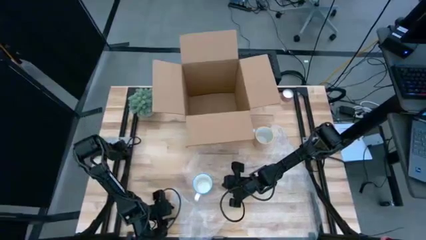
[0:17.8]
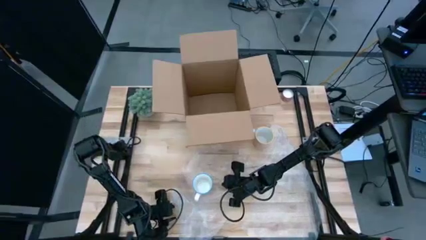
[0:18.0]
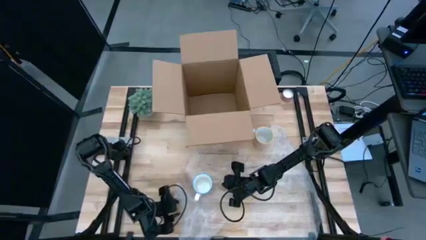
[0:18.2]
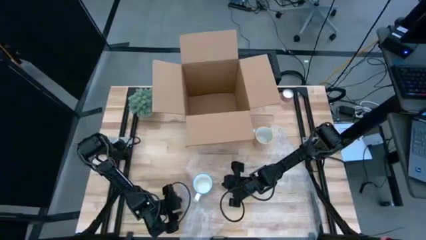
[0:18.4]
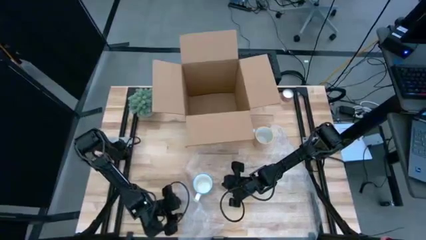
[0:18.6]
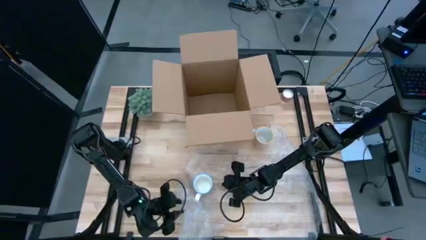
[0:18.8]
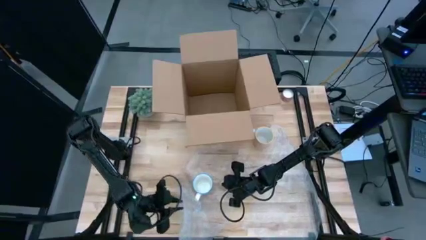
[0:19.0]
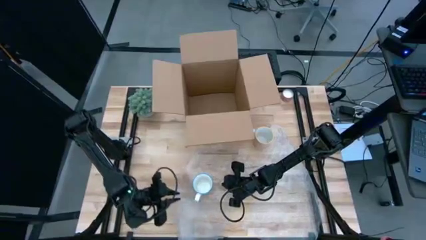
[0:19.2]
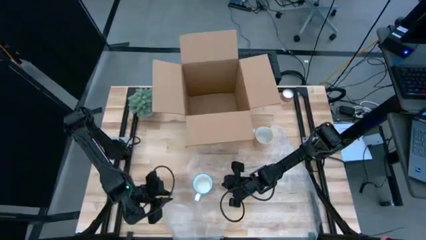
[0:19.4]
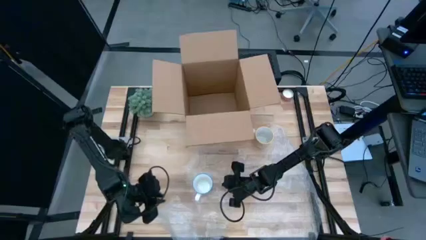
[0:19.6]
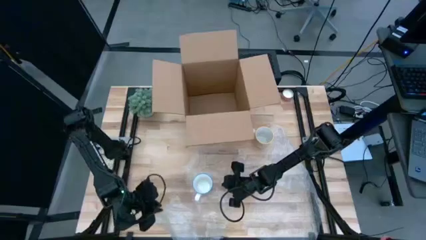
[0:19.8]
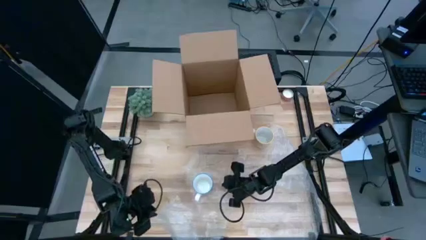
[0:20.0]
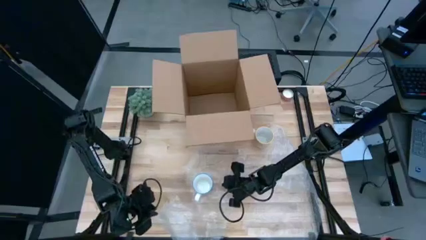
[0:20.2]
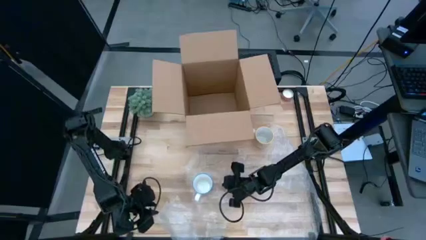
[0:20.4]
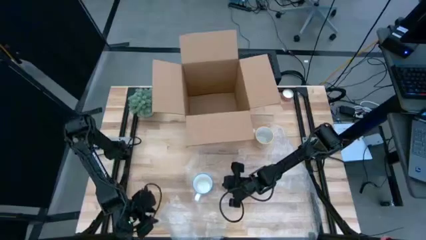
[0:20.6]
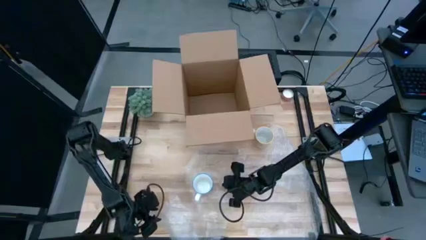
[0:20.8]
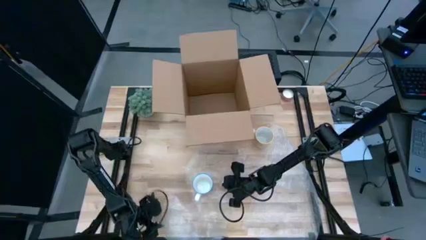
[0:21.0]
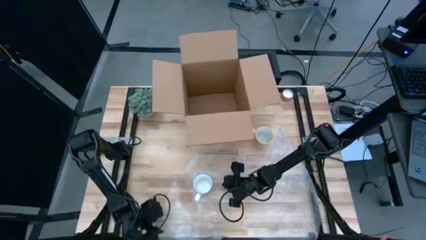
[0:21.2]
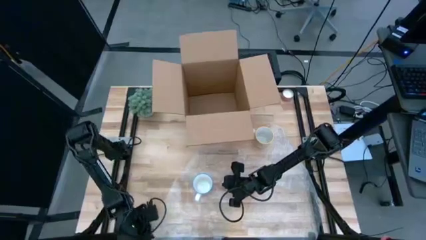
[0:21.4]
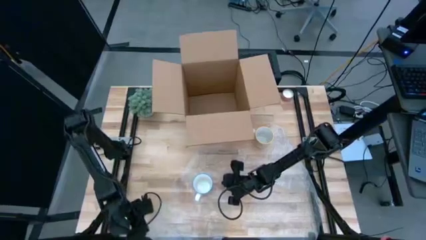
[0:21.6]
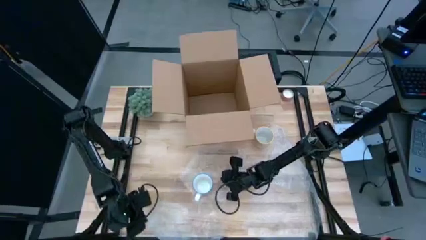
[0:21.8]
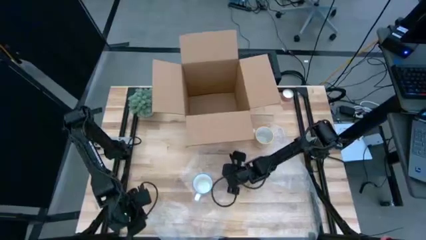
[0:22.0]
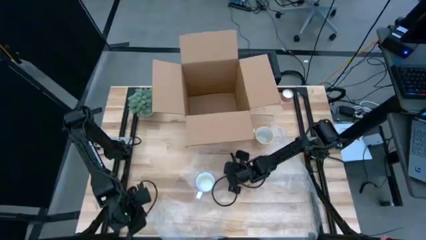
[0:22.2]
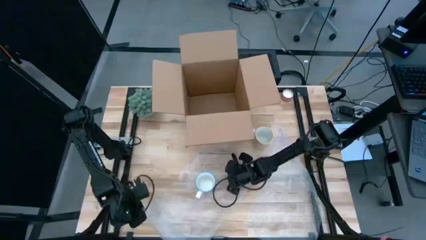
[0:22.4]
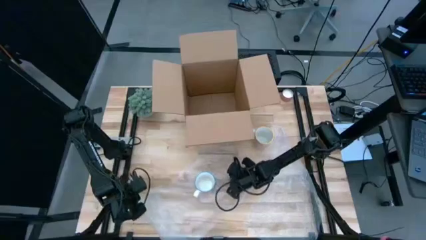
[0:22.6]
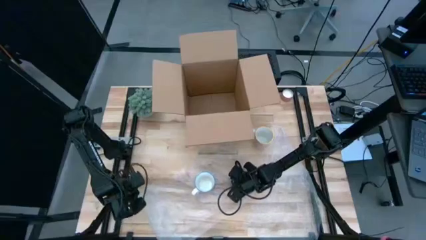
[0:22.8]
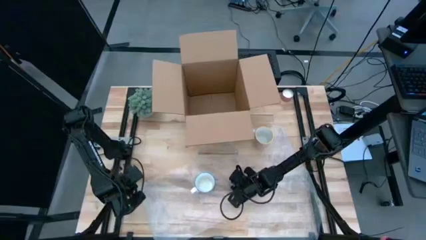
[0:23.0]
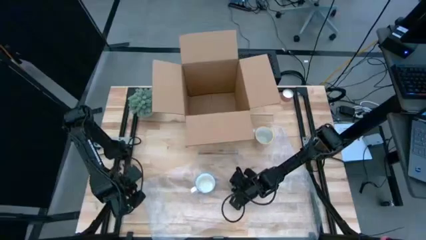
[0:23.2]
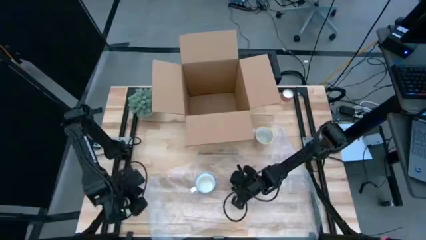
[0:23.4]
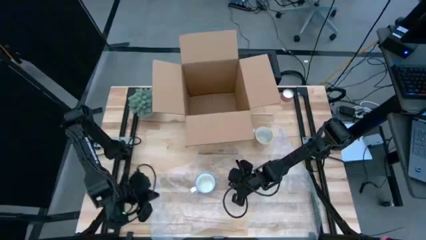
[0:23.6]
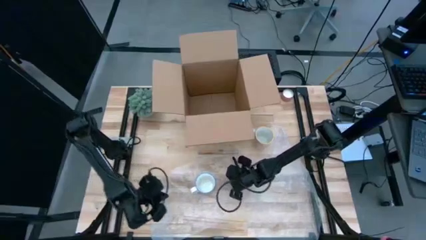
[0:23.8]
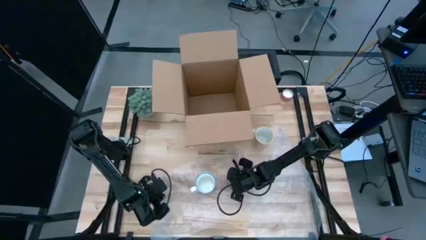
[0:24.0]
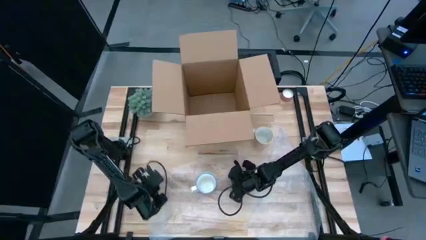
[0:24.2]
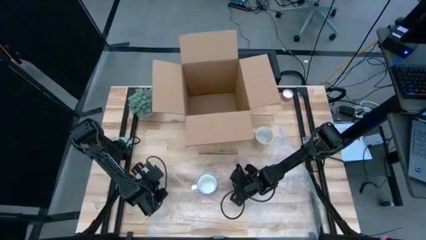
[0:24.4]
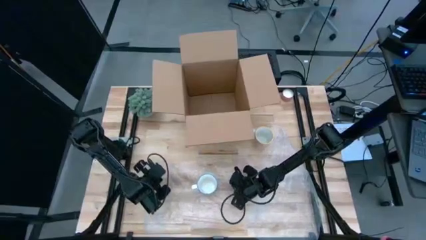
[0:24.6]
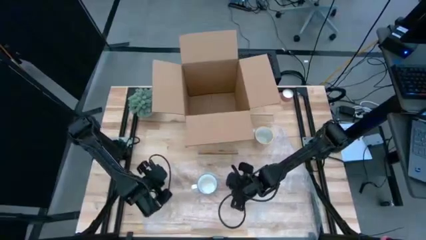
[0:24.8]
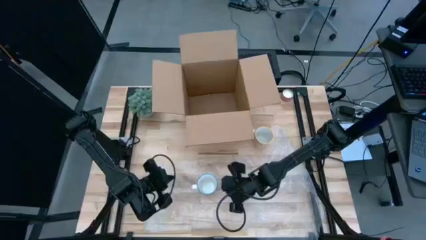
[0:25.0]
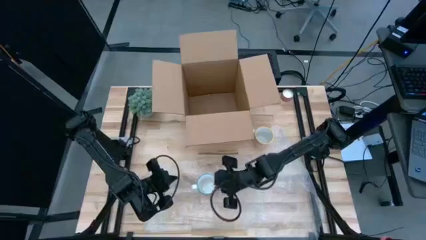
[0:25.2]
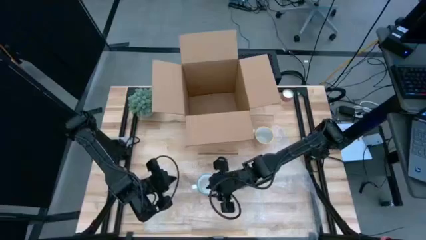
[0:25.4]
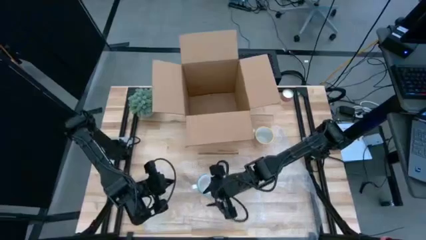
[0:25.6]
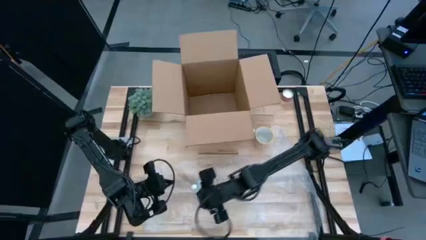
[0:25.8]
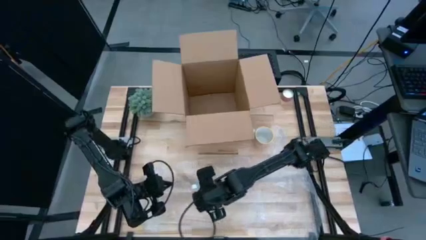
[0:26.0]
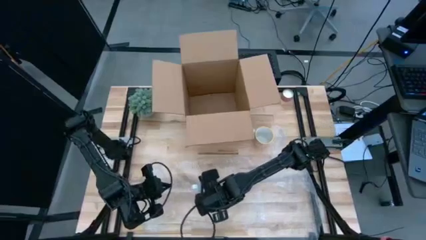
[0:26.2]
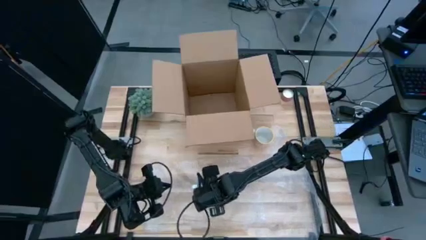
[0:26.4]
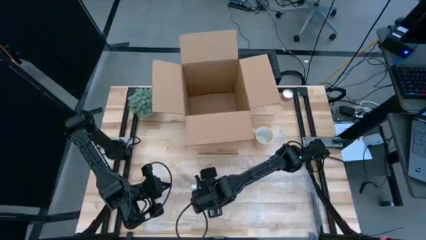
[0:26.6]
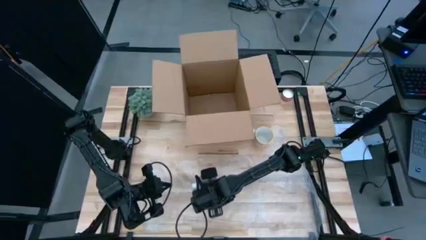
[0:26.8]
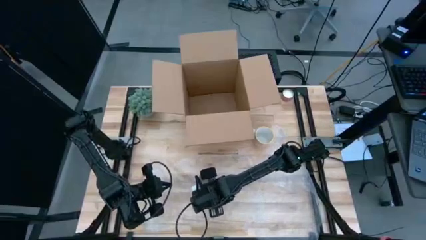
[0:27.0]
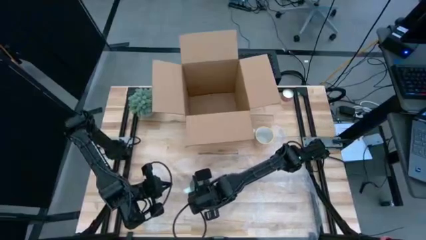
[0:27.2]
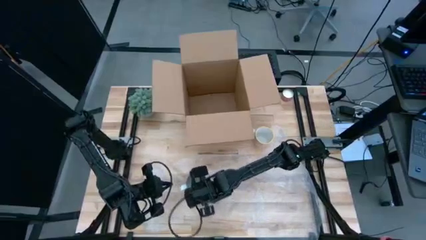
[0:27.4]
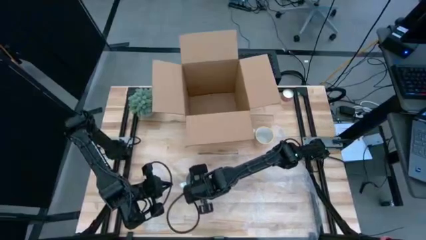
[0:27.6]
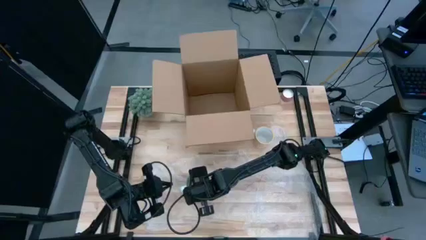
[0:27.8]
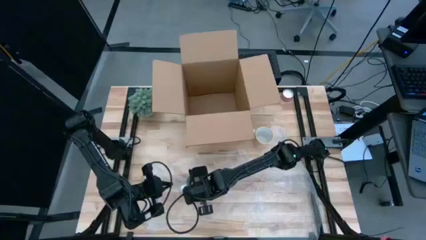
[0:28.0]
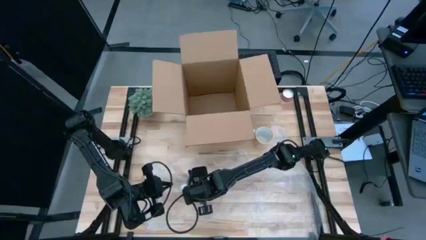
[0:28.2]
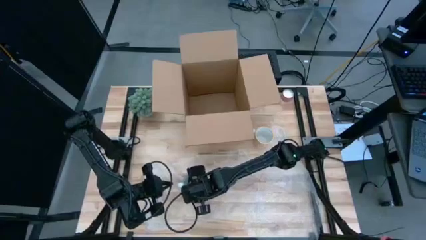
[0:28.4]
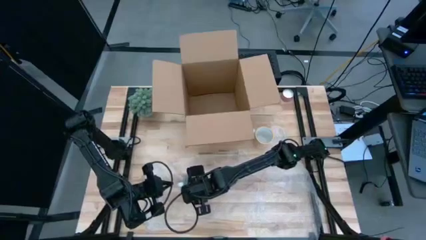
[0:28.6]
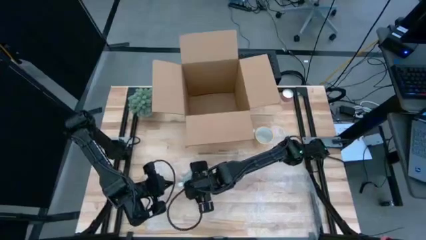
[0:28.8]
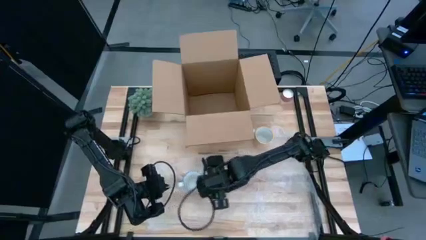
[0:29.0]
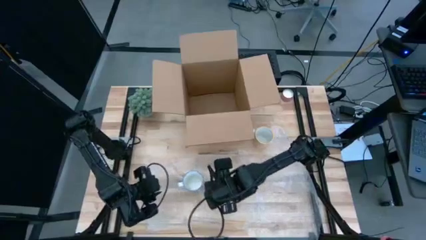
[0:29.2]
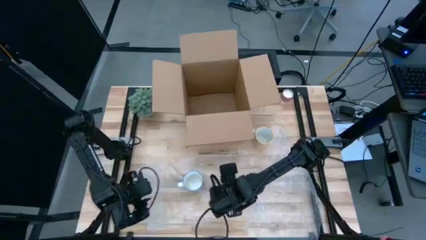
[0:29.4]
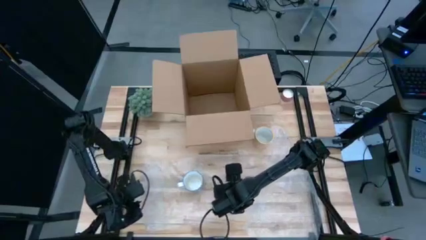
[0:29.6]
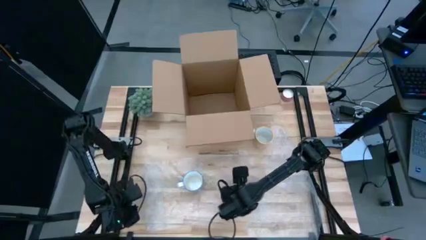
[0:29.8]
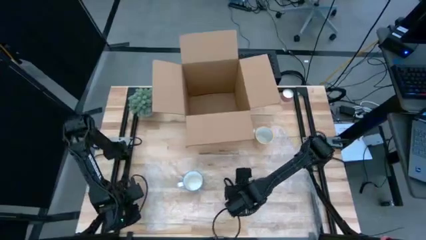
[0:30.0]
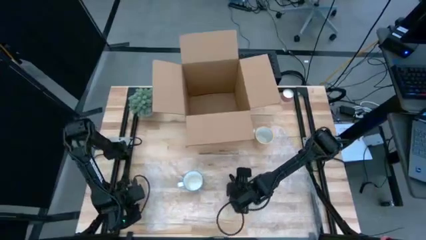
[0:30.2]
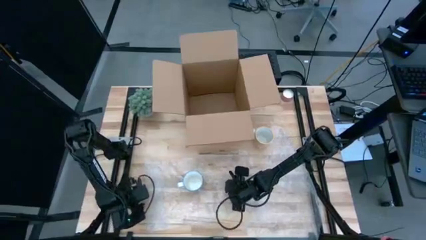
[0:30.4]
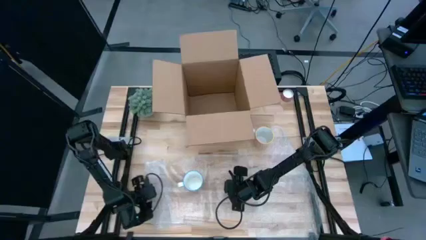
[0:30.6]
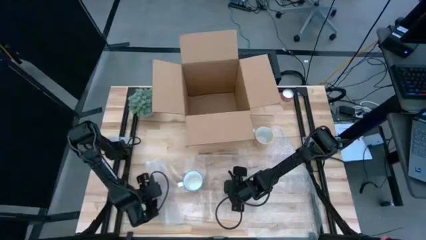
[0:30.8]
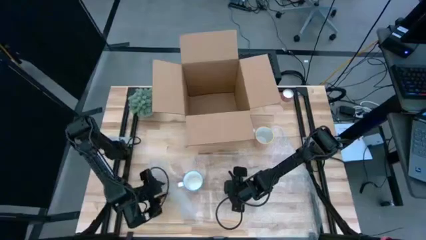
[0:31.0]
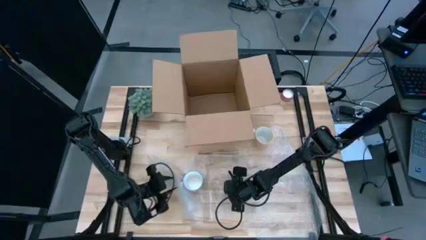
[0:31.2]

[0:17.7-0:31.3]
Task: wrap mug
Wrap the red cup in the bubble wrap
